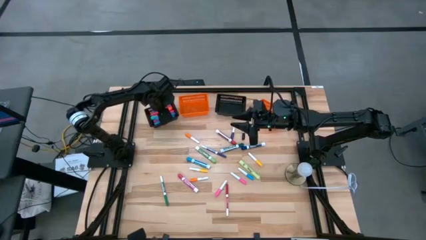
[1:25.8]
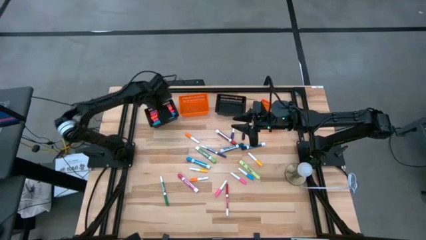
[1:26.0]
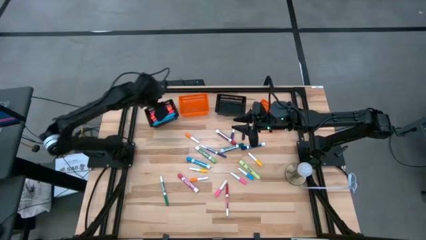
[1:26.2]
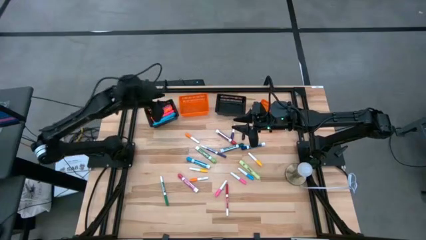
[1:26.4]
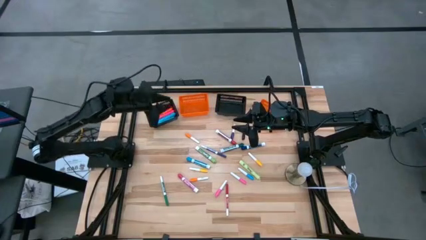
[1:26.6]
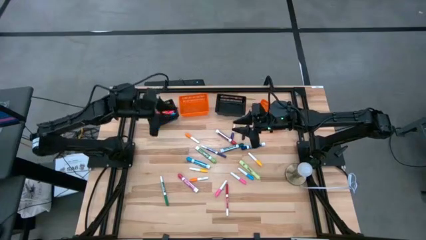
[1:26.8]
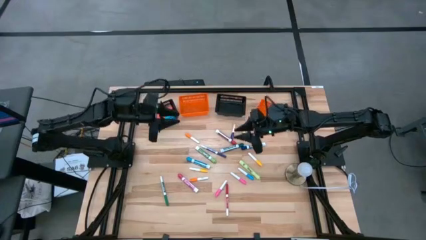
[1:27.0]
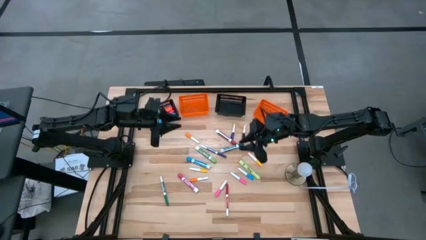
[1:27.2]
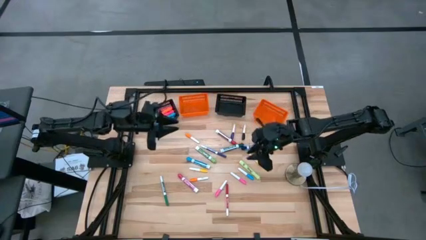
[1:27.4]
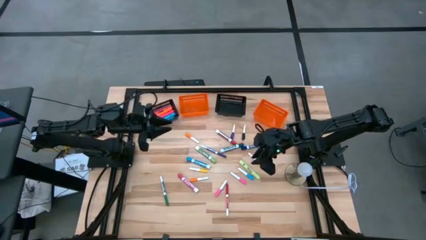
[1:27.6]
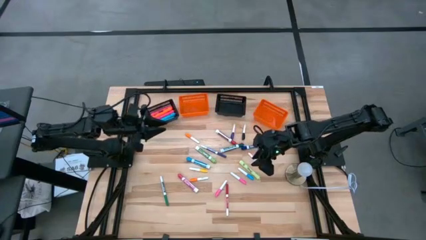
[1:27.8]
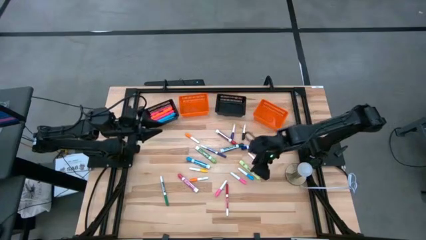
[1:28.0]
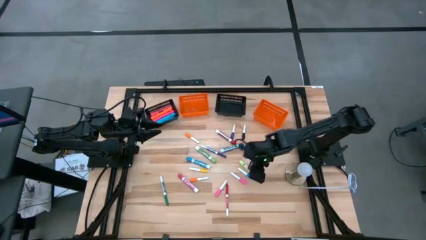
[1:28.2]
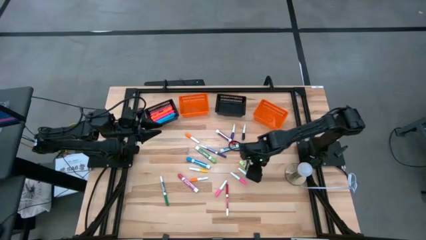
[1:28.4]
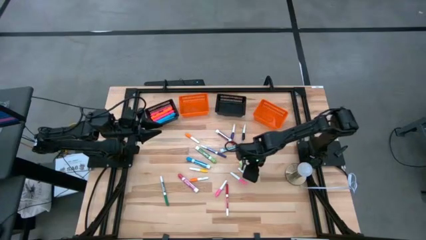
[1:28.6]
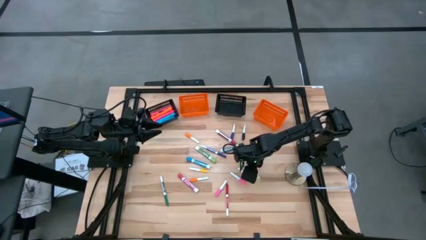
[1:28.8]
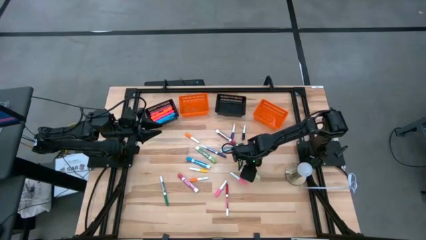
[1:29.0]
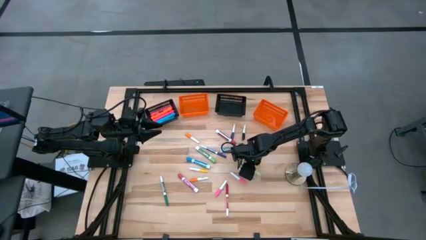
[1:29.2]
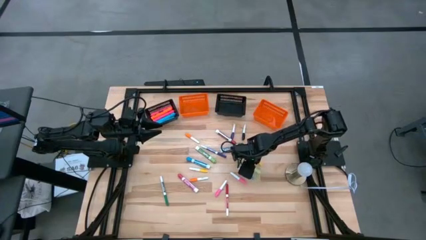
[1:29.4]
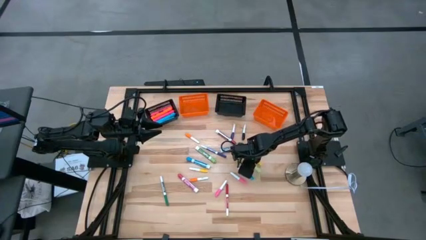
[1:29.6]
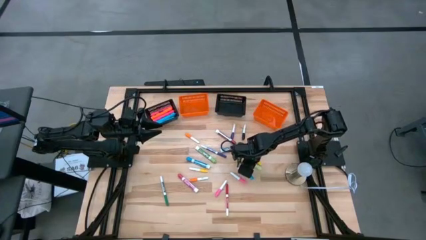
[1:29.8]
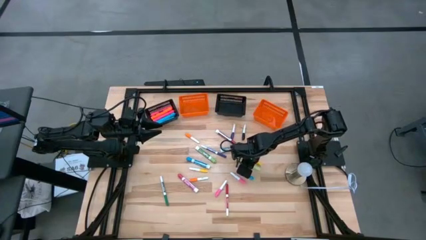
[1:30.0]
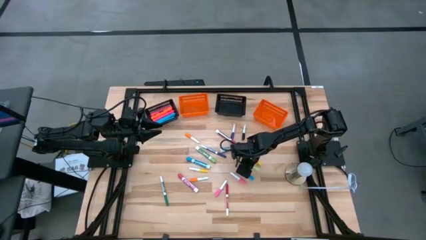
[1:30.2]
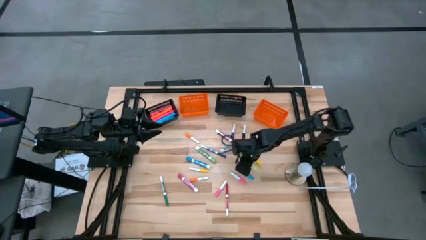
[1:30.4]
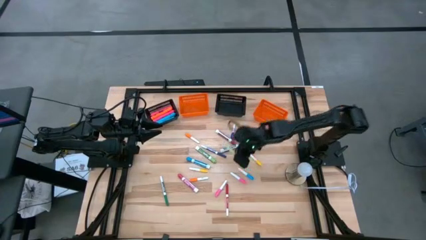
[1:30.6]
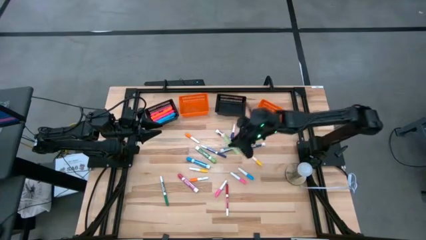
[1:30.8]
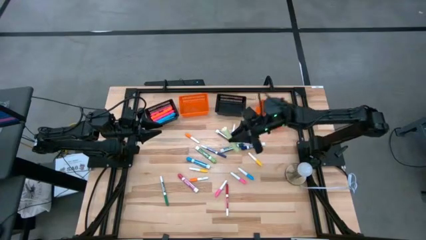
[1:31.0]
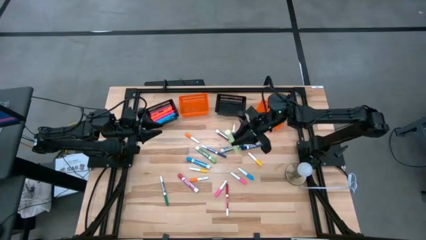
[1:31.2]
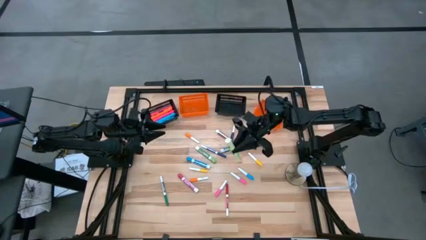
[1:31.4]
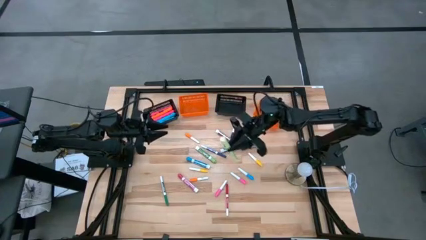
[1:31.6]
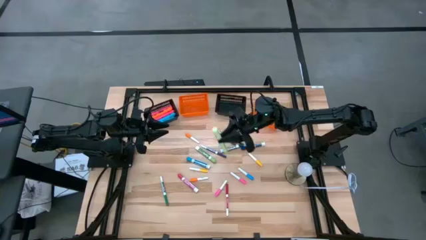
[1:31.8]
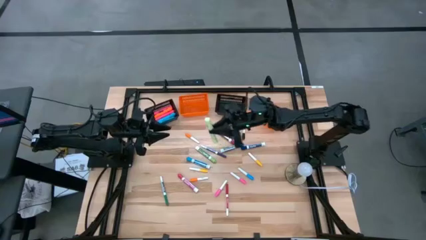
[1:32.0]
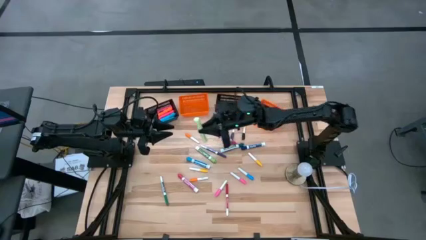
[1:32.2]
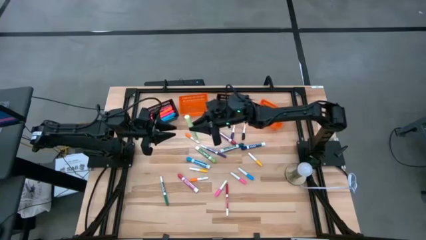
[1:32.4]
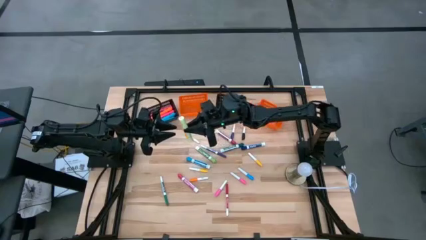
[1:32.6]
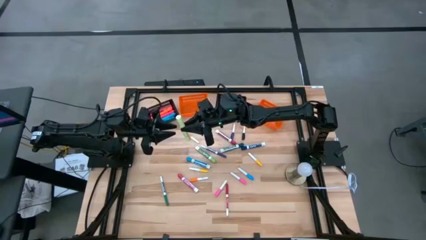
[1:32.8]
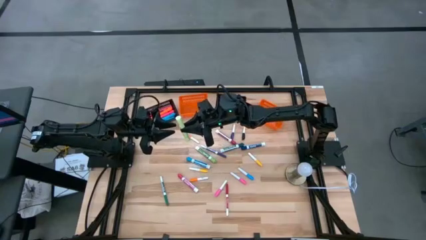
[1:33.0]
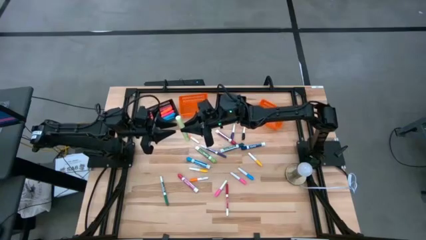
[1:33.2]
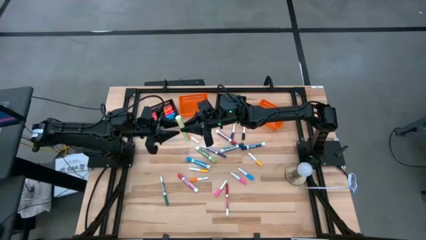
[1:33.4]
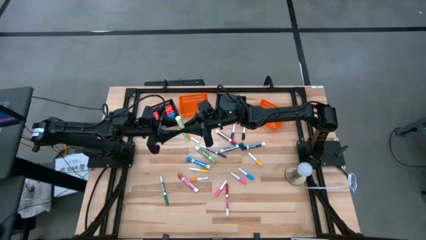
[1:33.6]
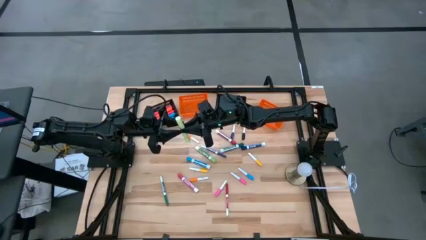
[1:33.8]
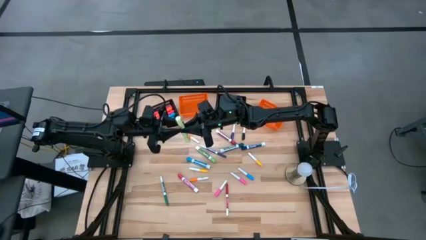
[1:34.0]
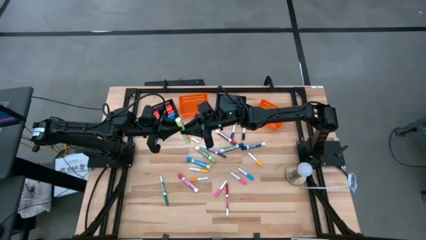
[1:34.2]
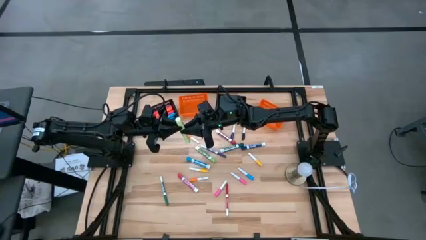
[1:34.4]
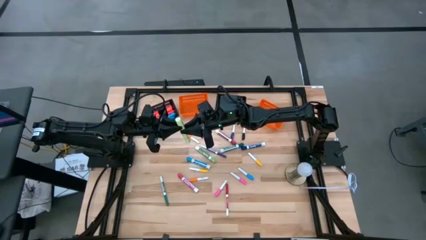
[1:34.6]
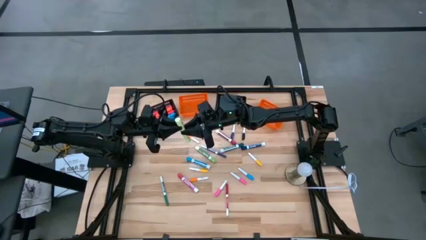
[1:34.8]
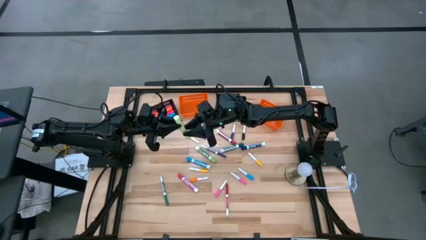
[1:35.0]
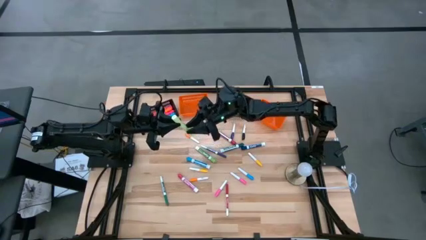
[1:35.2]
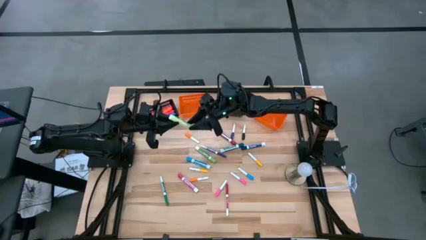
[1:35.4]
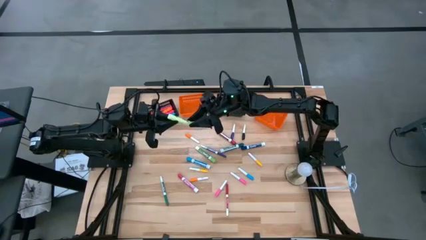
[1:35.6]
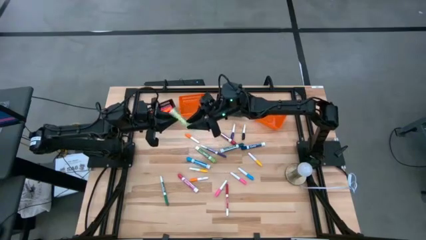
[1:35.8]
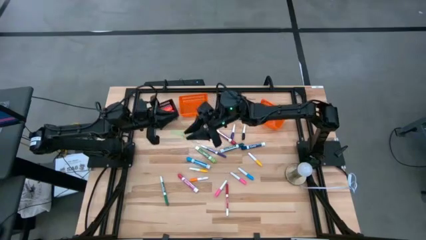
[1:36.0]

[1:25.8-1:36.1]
Task: Pick & Place Markers
Put the light green highlighter pen into the left black bin

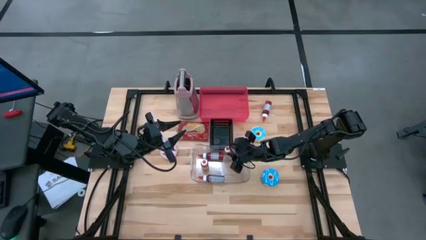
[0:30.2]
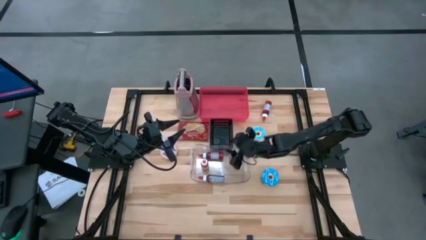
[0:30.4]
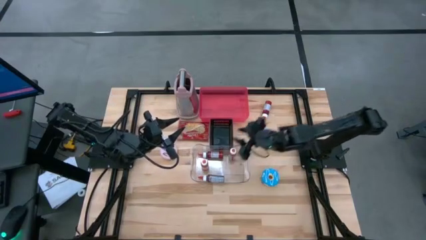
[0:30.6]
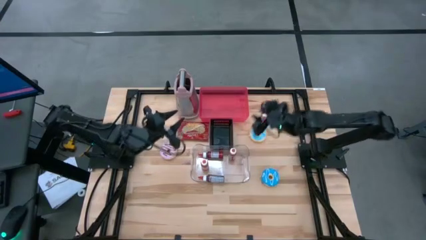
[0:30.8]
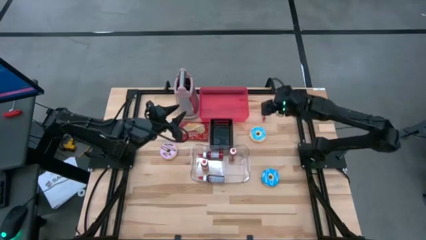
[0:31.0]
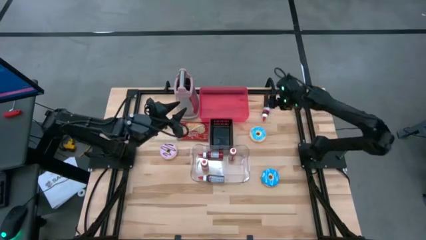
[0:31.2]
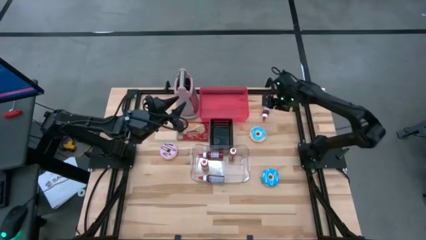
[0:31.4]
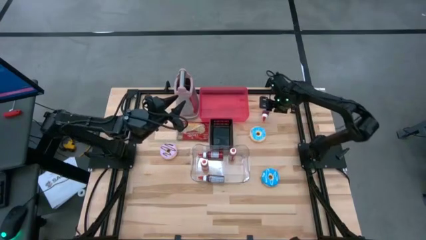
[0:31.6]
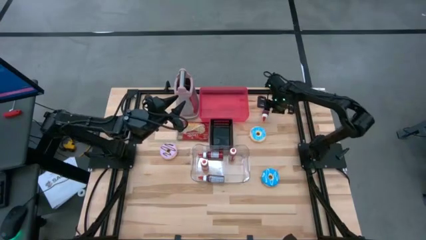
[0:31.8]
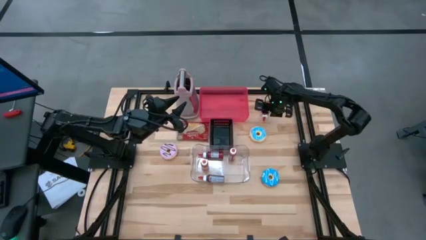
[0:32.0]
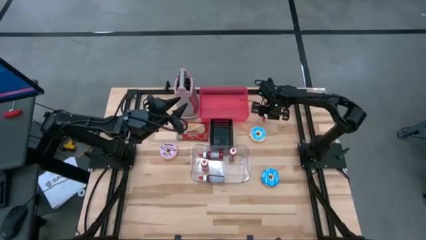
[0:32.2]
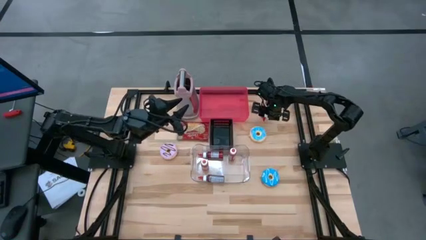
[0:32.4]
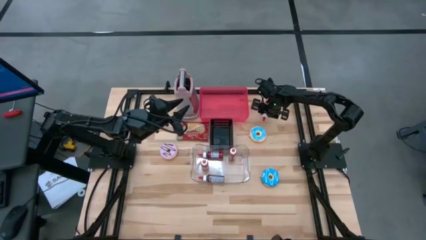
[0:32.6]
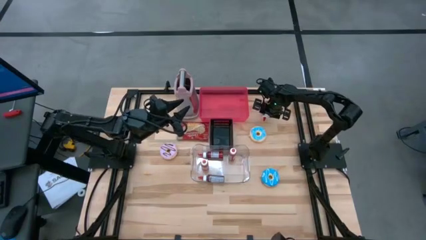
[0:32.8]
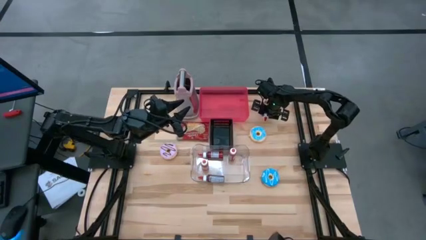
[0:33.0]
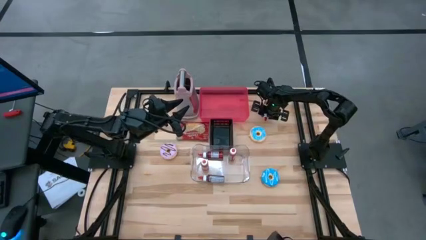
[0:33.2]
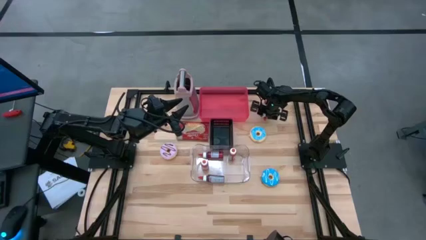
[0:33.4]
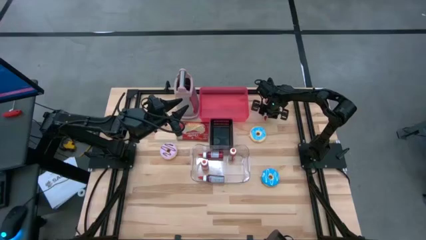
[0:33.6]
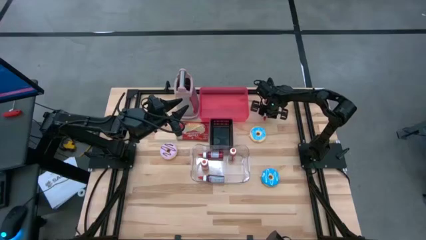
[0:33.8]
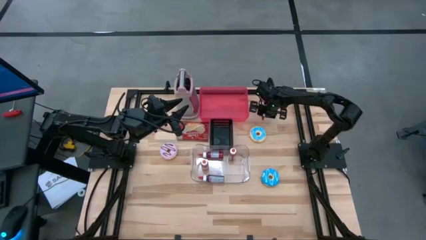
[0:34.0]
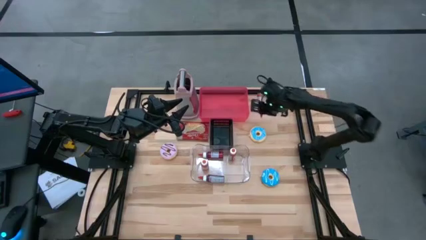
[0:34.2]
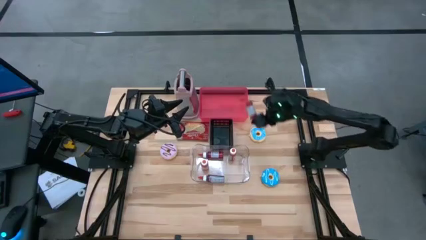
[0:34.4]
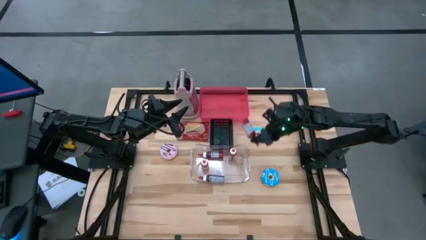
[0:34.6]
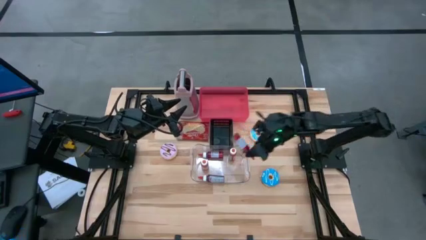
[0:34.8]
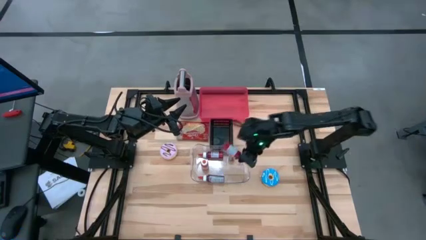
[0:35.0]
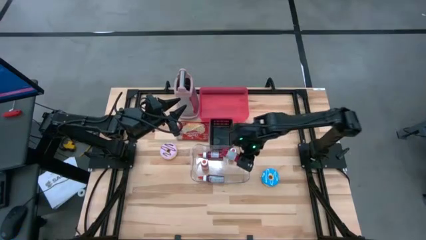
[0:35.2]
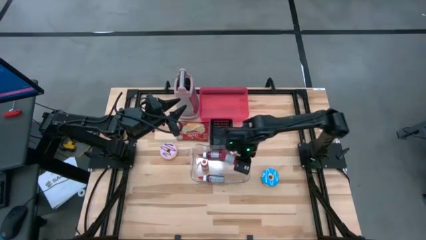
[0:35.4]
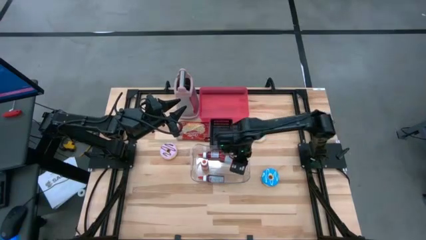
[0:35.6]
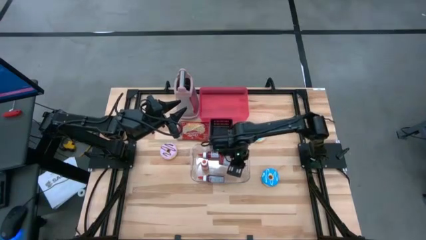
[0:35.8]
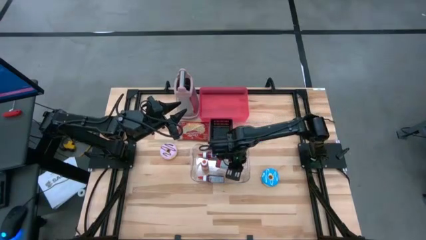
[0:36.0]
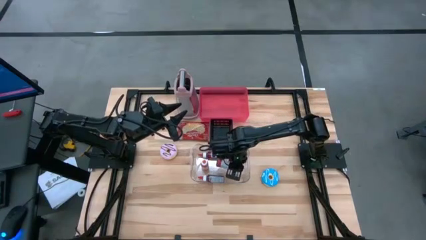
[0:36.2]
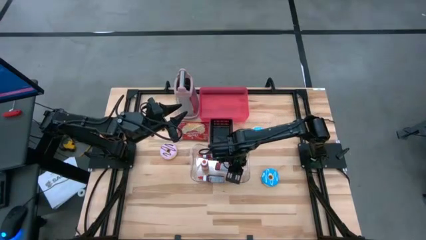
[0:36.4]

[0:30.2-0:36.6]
Task: Pick & Place Food Item
Put the red food coloring bottle into the transparent bin
